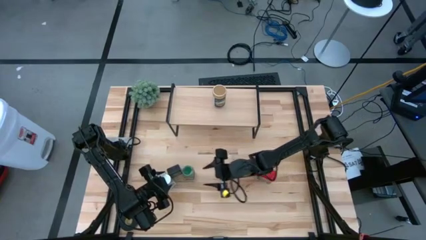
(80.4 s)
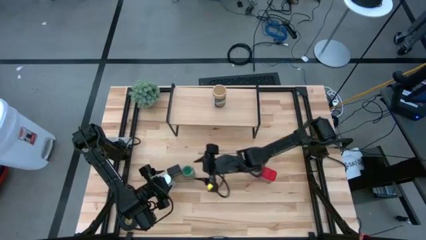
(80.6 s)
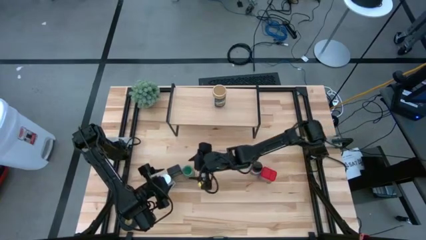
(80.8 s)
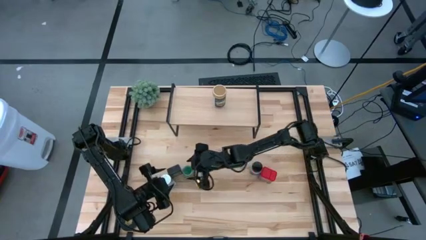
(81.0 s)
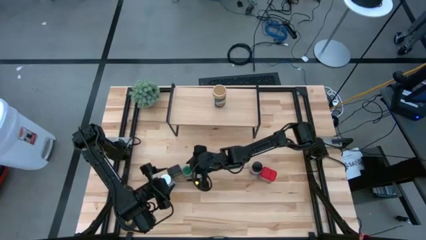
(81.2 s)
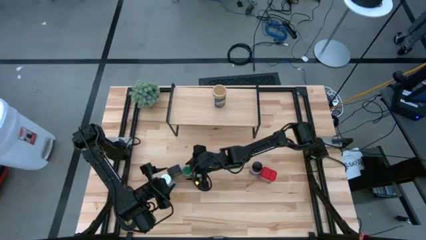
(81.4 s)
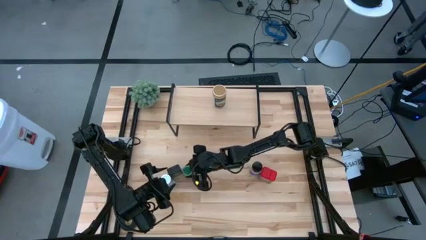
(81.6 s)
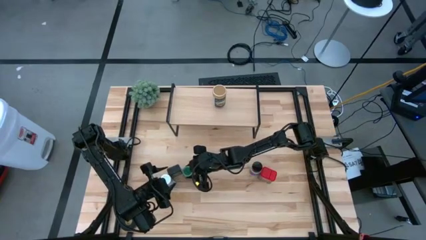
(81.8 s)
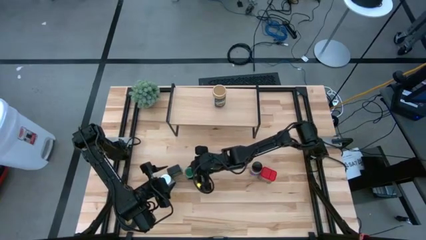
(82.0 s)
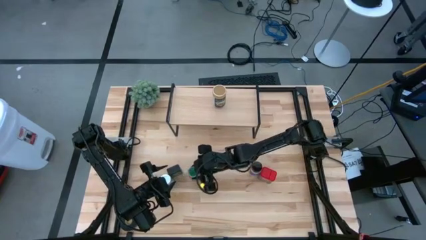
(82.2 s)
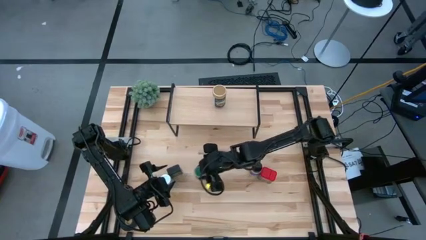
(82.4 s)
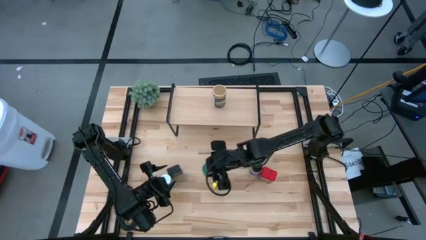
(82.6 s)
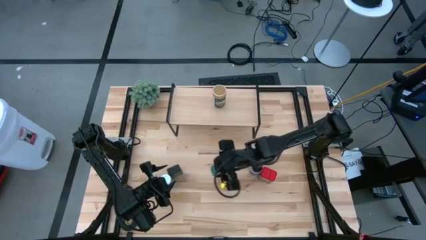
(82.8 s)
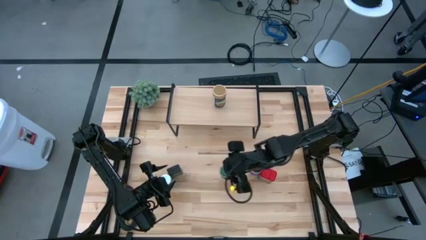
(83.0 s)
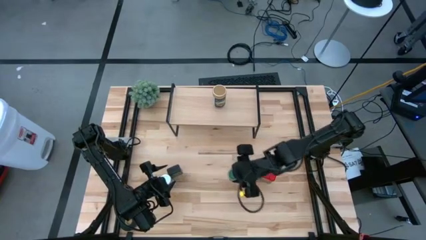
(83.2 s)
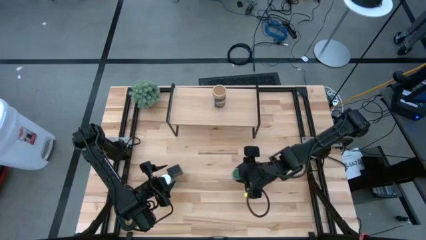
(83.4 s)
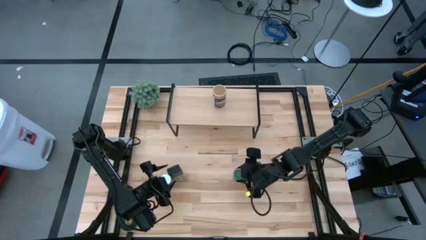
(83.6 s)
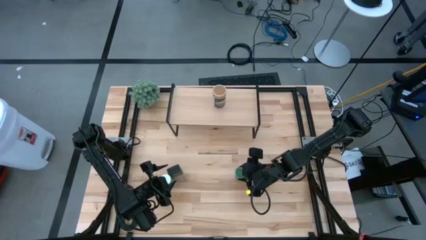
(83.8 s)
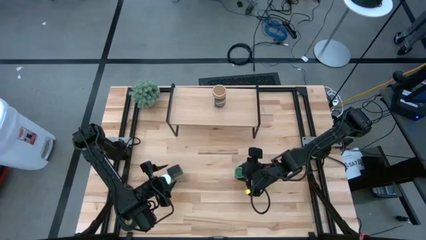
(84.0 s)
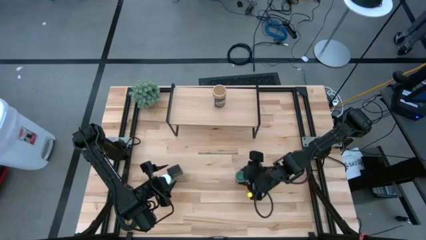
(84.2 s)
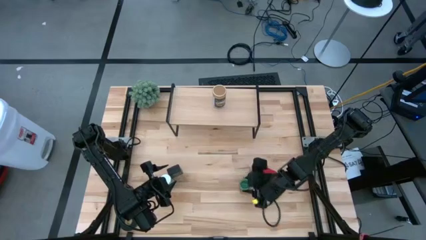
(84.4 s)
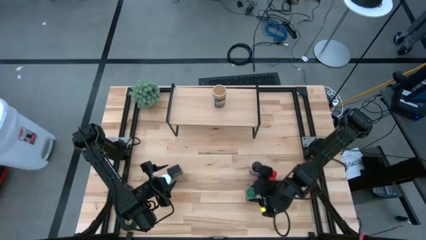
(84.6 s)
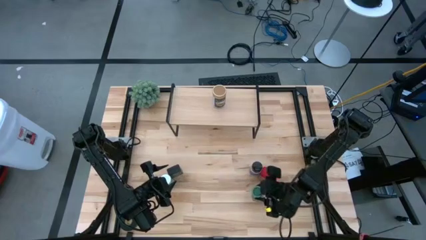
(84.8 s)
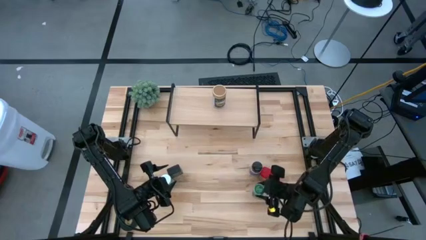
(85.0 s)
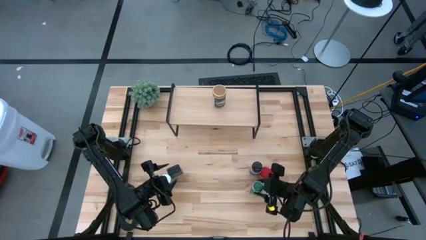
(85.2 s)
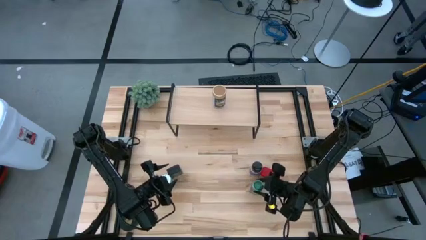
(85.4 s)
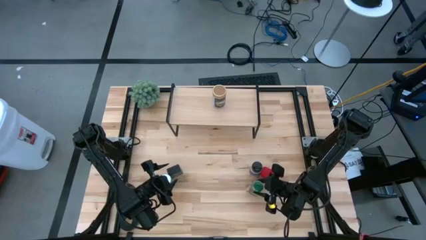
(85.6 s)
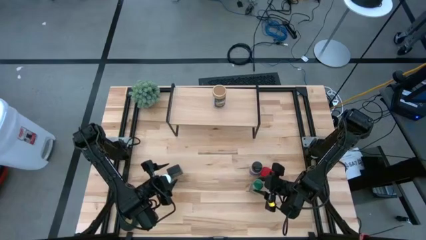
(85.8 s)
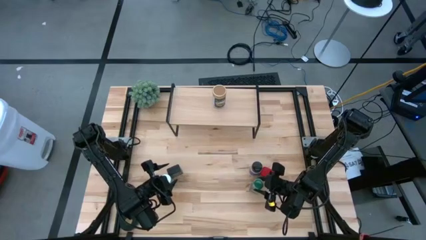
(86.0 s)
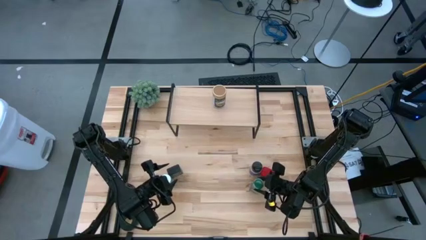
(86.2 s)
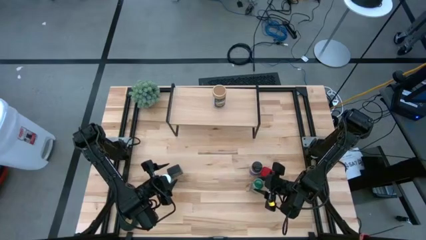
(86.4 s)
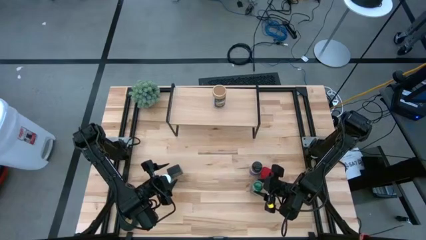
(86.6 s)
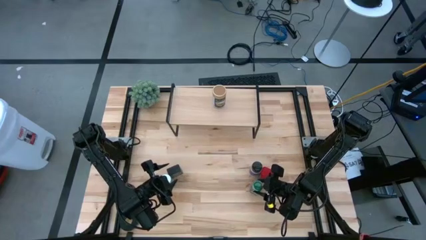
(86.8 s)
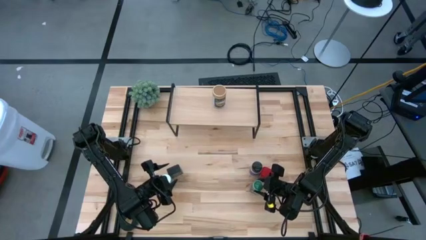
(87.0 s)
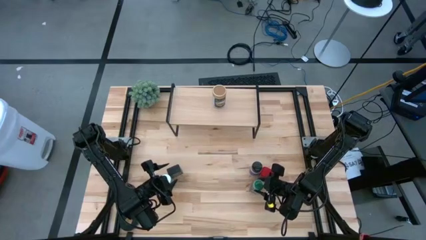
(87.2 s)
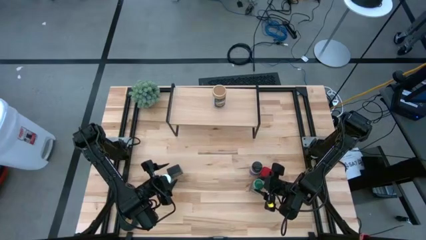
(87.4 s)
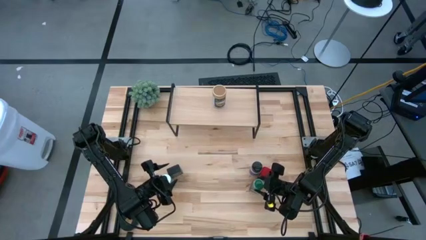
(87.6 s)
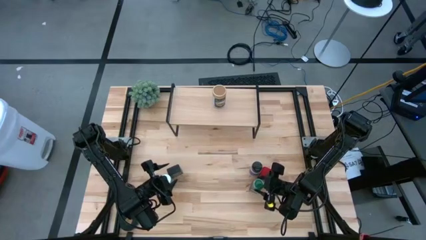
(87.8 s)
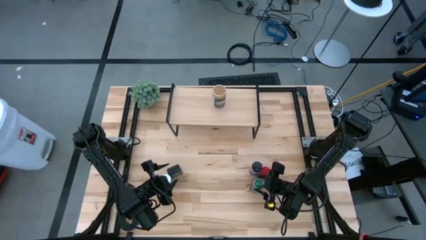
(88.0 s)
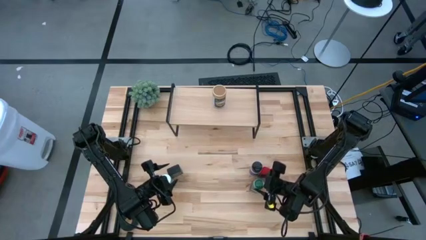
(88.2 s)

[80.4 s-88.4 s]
Task: Shelf spices
Move the green seasoning bottle to the middle right of the table

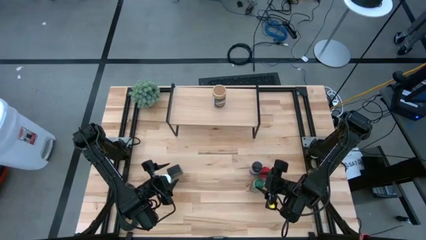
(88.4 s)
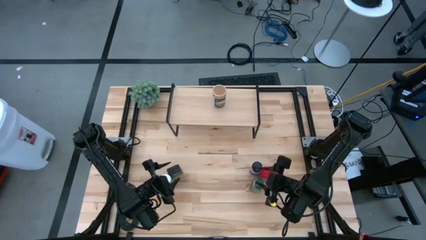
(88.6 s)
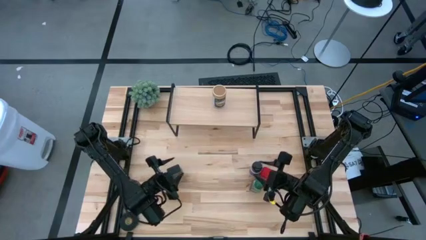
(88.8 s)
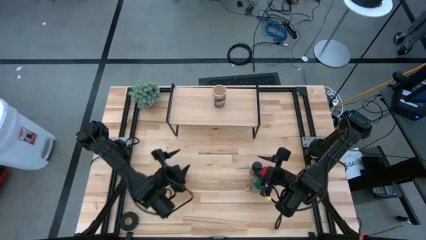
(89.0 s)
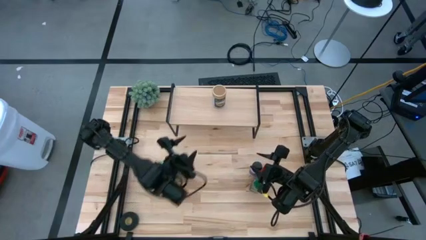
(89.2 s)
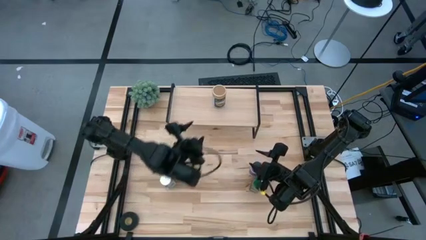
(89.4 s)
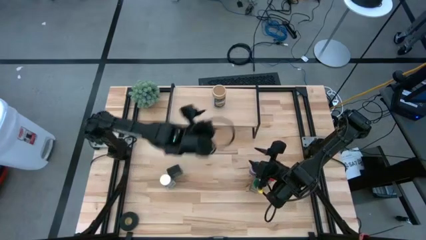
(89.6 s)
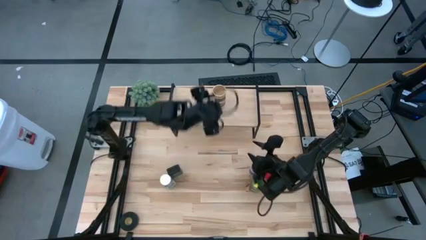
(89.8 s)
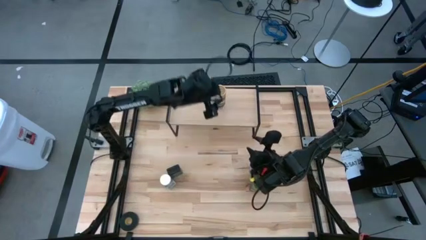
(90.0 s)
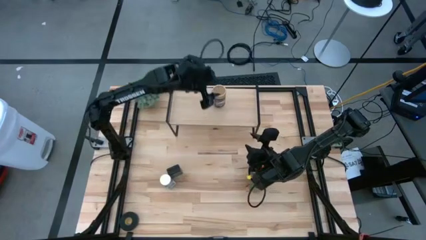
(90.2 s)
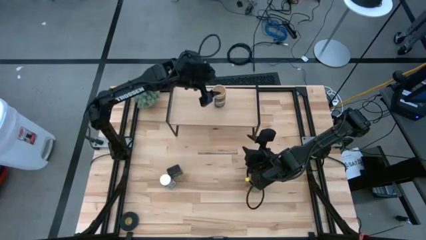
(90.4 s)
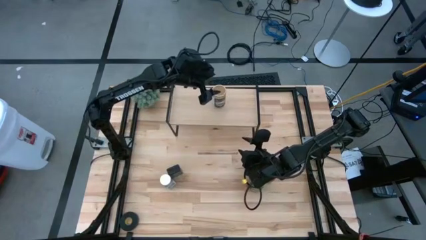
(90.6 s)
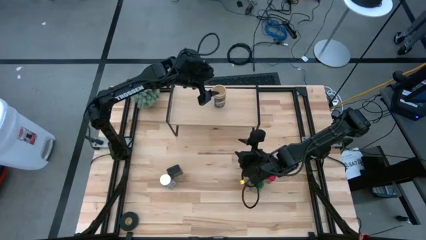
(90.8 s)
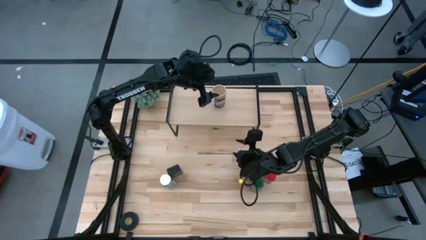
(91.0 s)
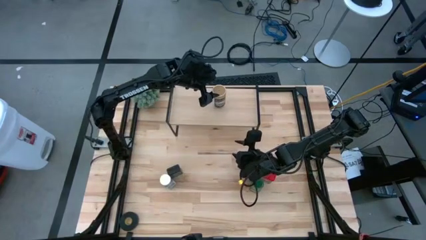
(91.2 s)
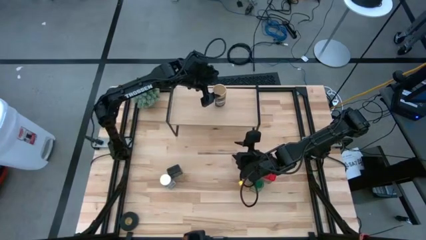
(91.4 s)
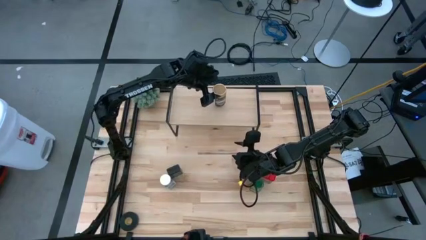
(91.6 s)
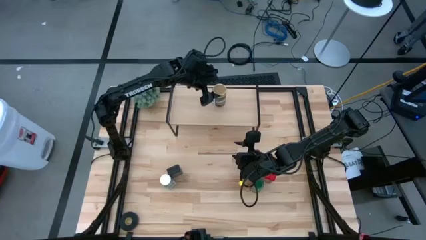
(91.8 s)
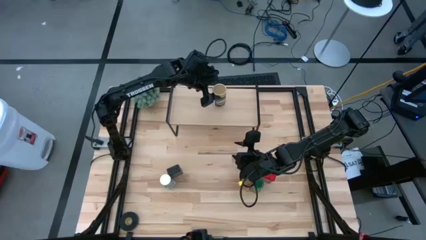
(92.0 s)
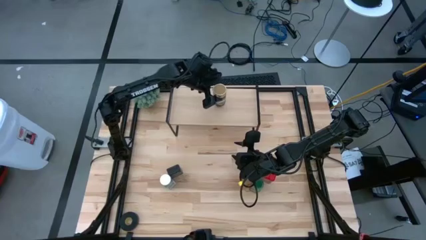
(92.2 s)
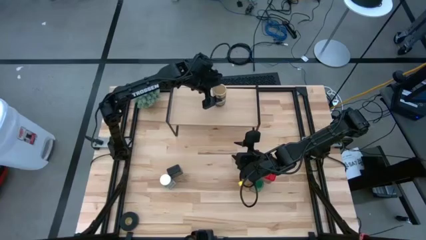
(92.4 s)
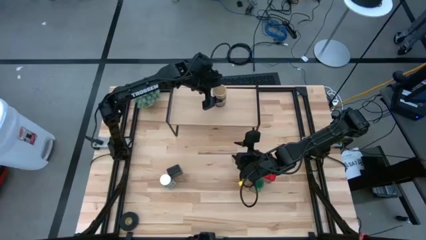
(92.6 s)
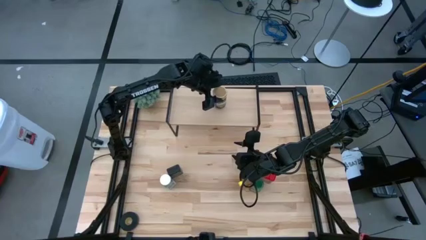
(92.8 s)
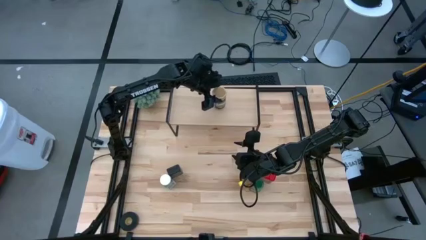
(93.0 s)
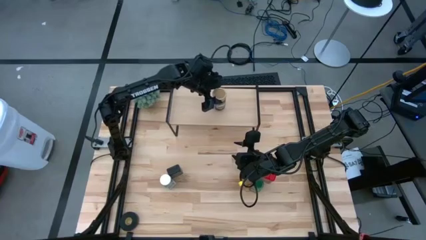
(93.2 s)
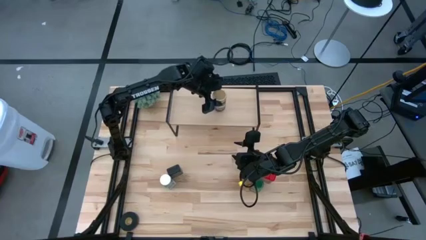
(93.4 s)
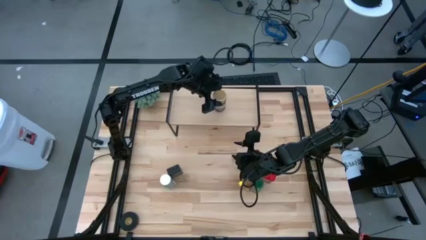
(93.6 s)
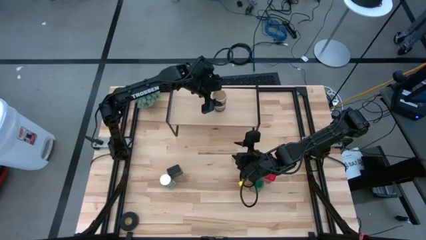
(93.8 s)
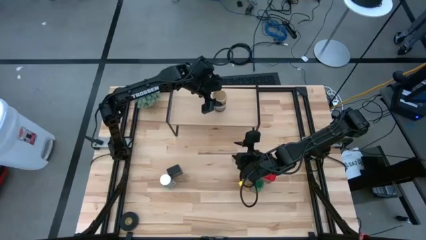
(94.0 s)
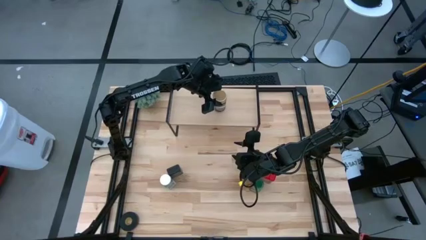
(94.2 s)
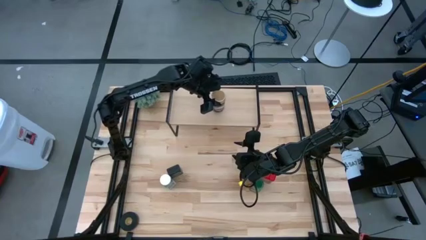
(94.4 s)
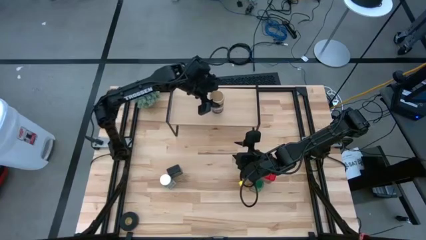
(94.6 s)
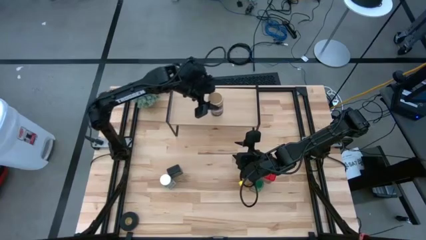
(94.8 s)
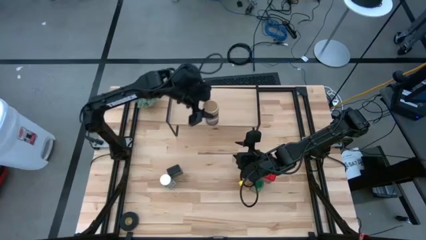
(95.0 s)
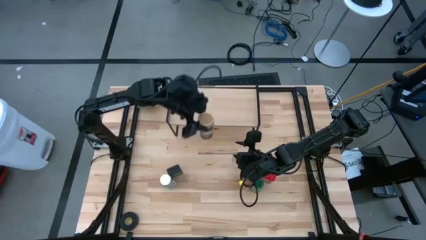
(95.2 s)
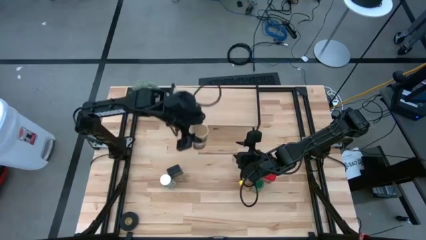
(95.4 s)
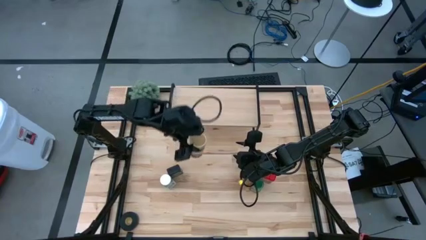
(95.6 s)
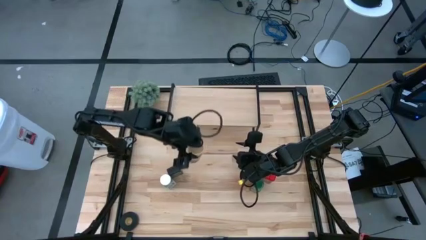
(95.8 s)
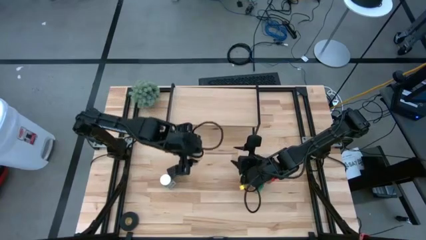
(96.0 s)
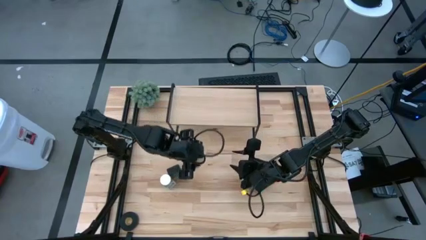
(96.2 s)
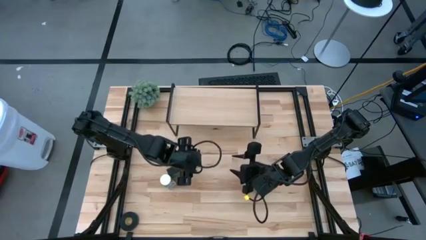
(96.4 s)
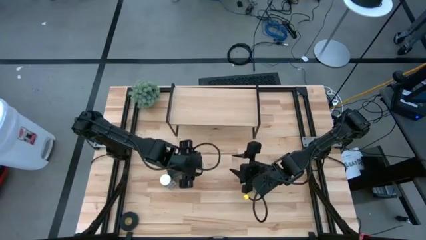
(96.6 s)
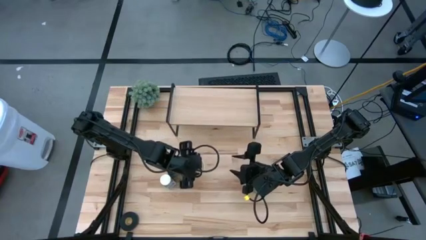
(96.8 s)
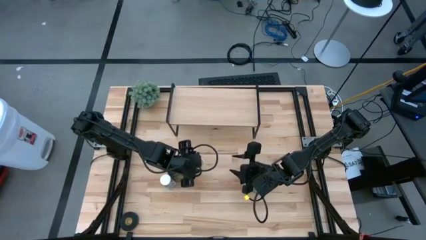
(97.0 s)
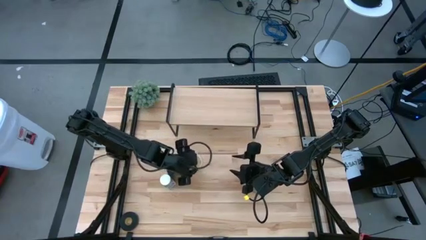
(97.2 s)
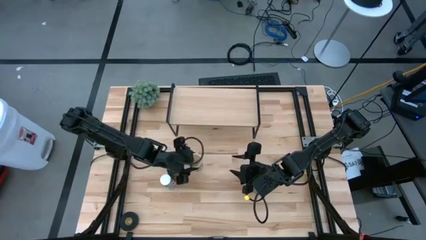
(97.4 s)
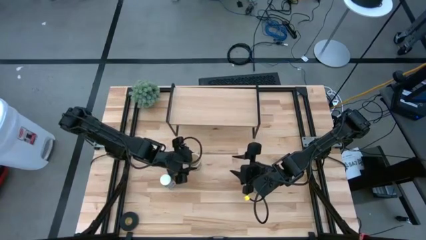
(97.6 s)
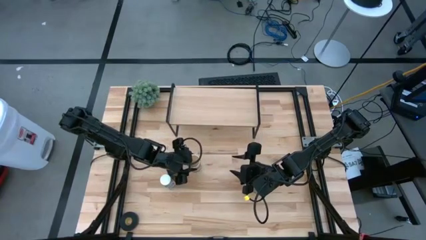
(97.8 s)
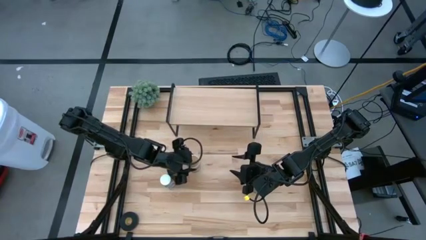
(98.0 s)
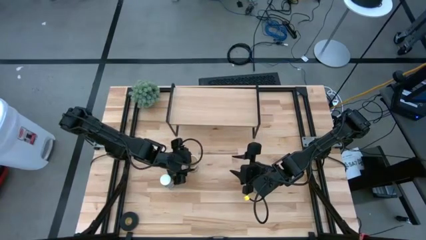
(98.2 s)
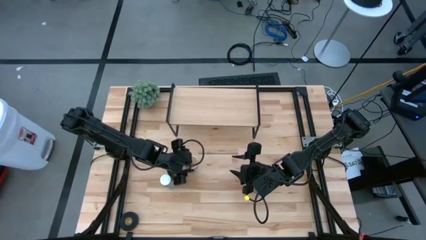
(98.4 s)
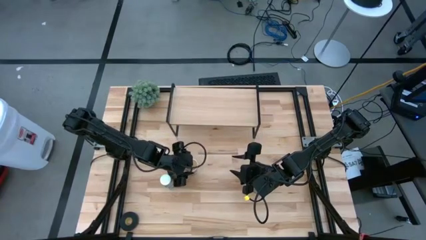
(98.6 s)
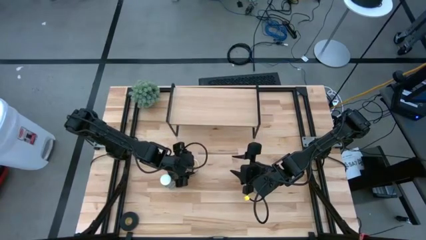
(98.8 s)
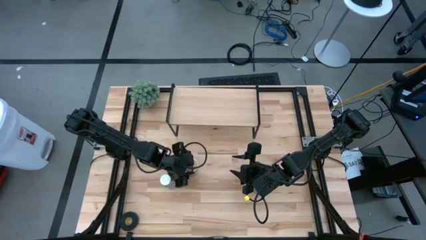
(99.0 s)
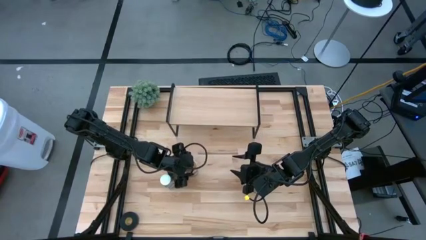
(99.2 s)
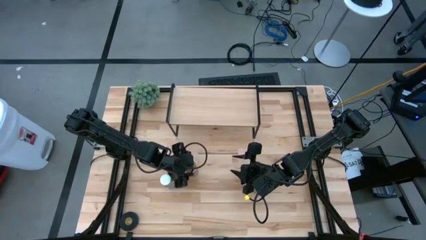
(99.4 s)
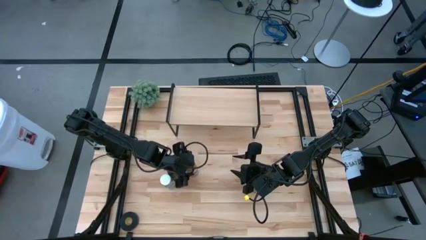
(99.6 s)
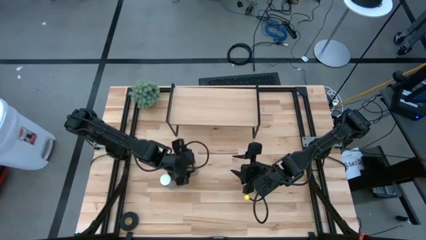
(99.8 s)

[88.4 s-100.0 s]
Remove the golden seasoning bottle from the shelf
